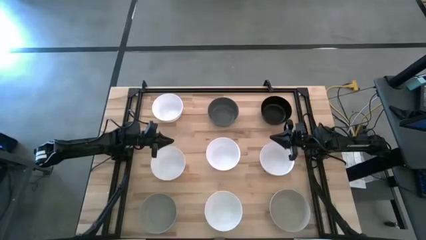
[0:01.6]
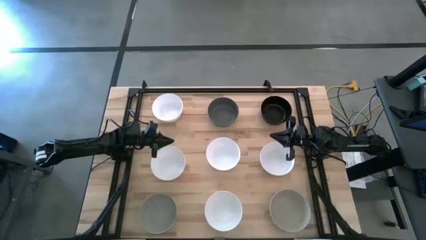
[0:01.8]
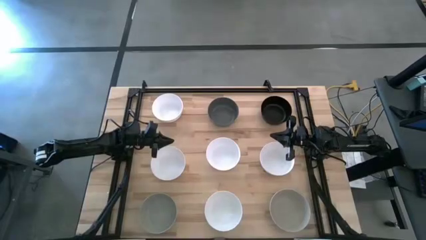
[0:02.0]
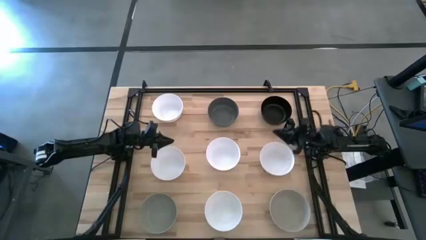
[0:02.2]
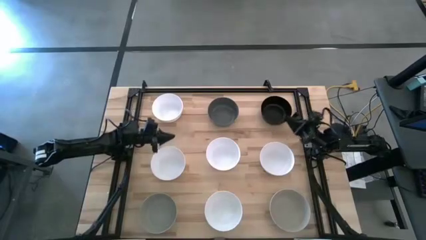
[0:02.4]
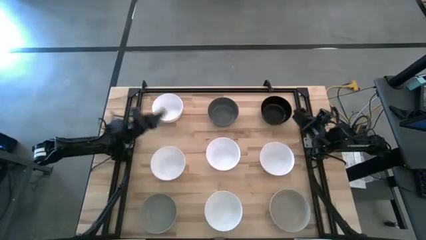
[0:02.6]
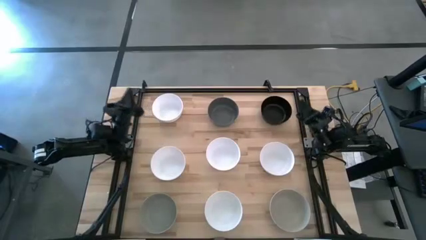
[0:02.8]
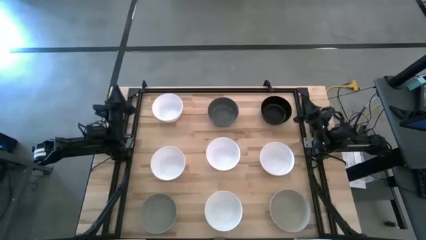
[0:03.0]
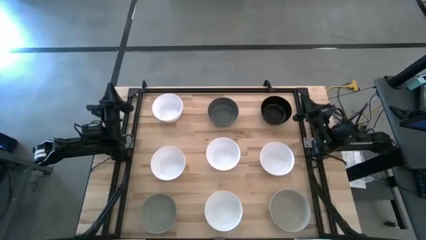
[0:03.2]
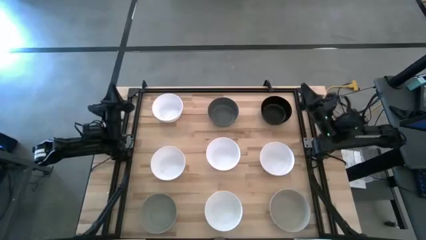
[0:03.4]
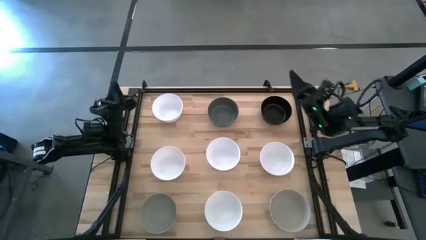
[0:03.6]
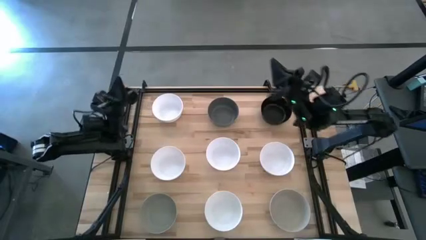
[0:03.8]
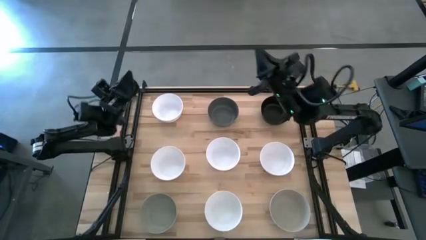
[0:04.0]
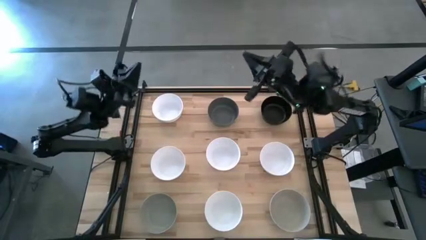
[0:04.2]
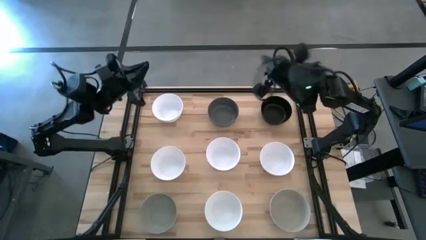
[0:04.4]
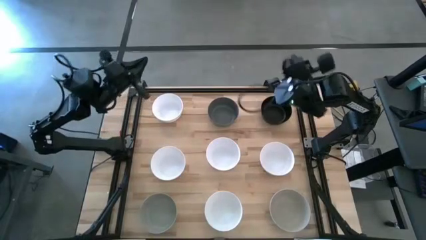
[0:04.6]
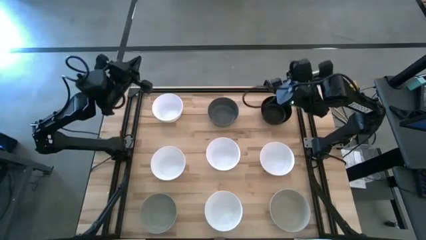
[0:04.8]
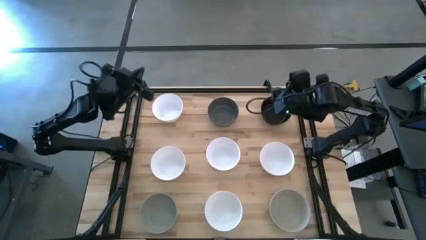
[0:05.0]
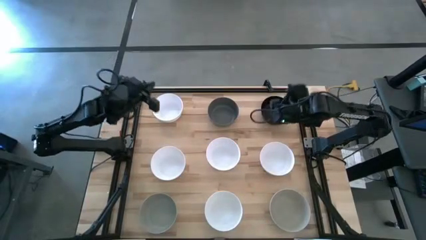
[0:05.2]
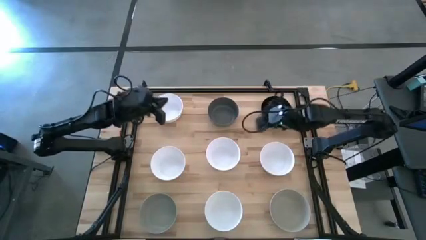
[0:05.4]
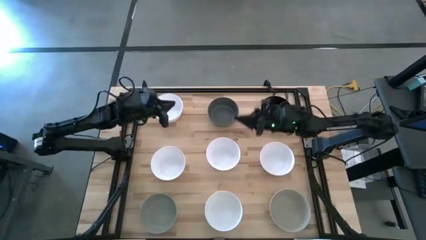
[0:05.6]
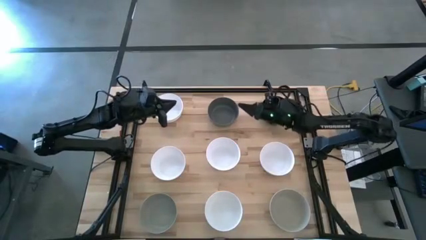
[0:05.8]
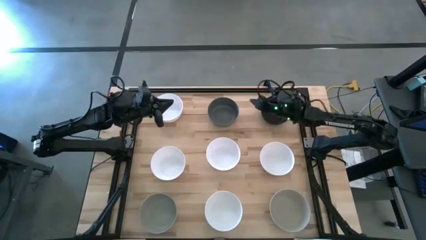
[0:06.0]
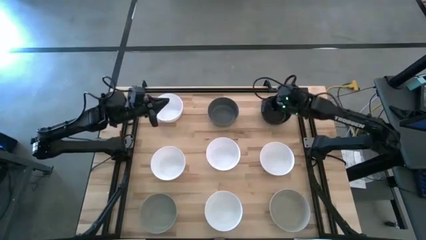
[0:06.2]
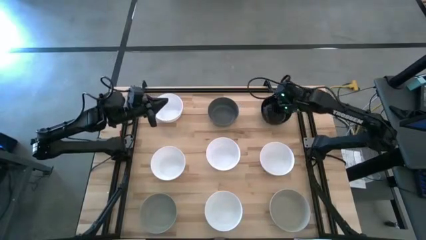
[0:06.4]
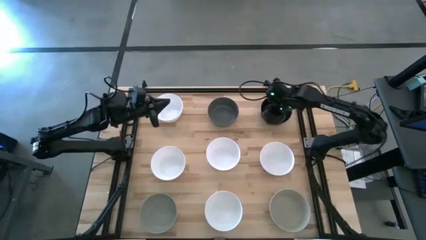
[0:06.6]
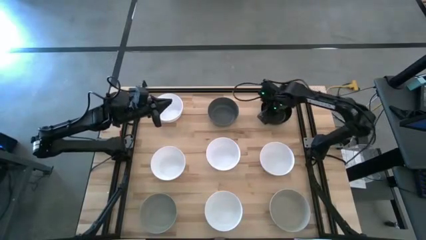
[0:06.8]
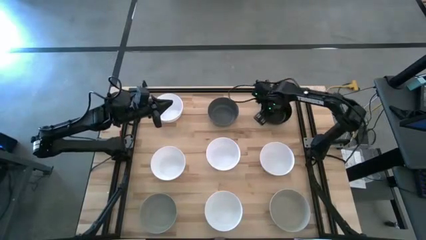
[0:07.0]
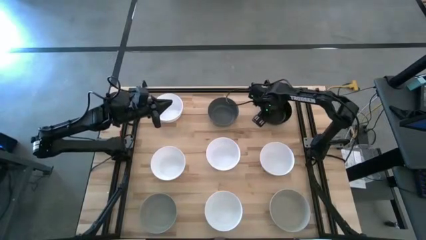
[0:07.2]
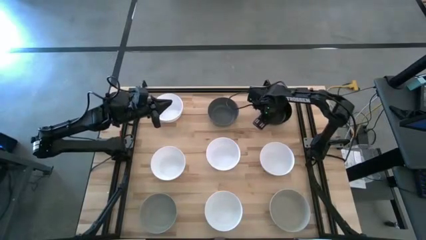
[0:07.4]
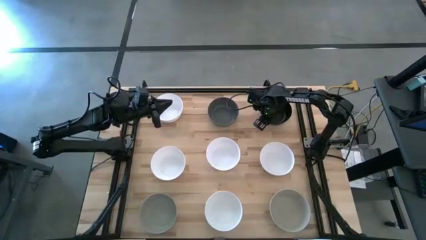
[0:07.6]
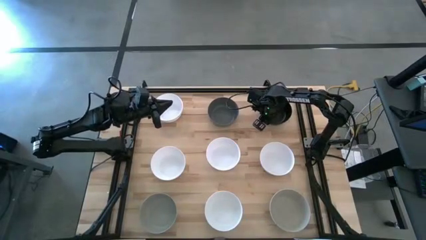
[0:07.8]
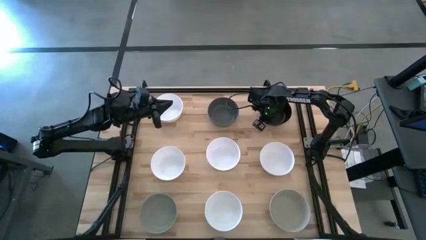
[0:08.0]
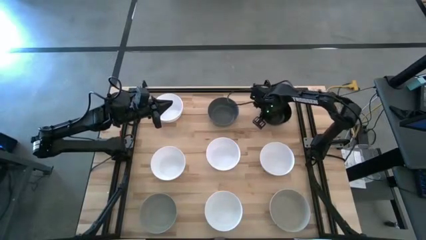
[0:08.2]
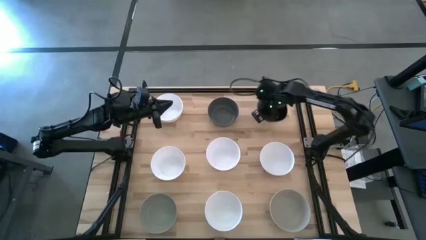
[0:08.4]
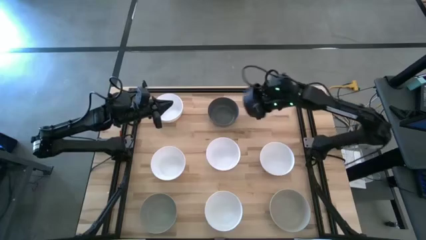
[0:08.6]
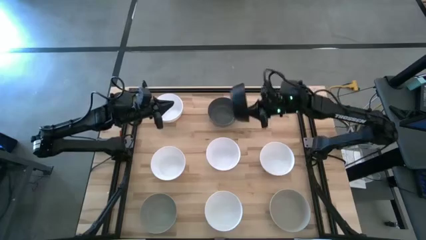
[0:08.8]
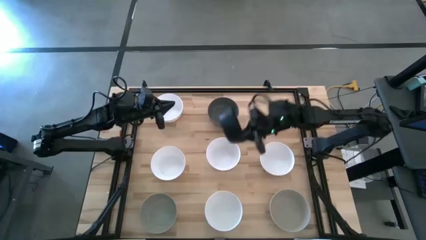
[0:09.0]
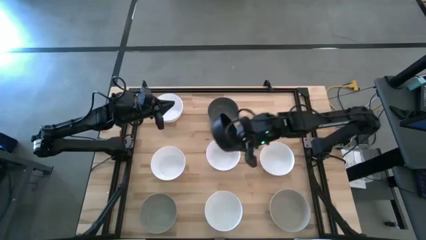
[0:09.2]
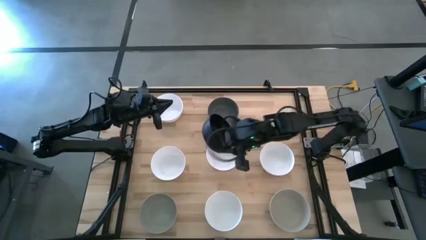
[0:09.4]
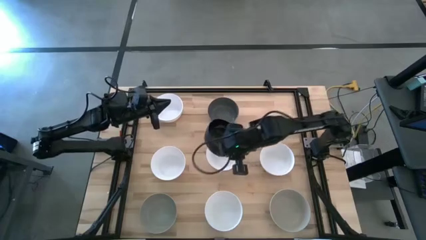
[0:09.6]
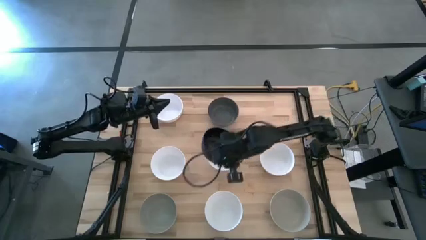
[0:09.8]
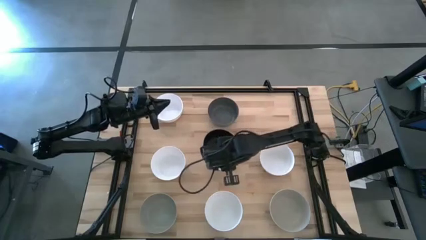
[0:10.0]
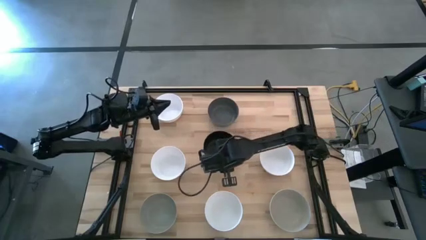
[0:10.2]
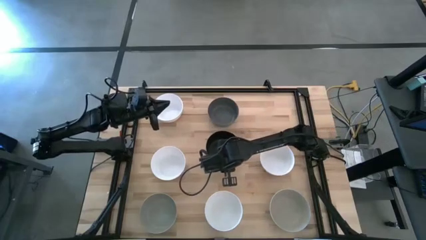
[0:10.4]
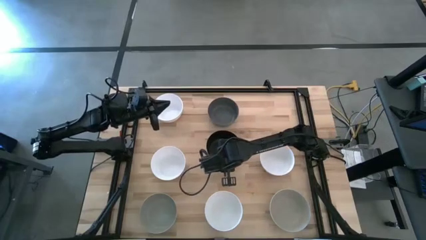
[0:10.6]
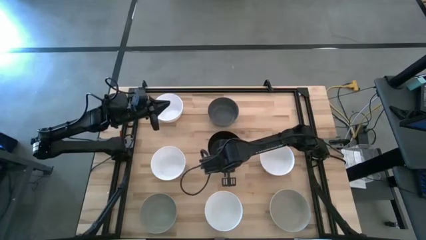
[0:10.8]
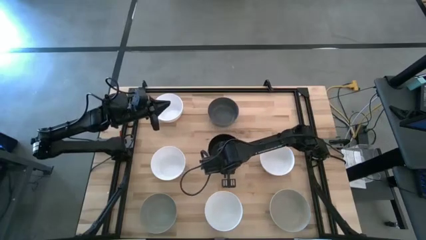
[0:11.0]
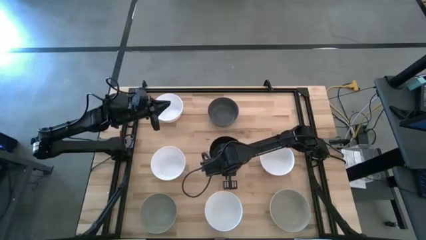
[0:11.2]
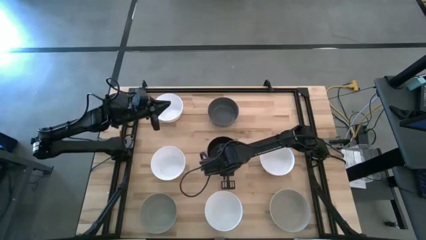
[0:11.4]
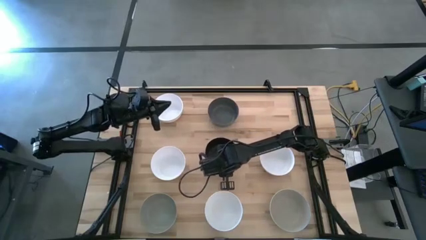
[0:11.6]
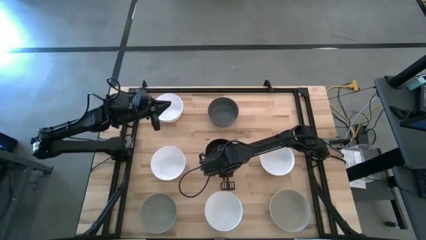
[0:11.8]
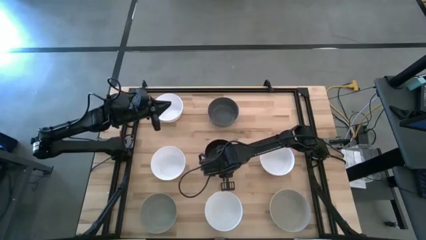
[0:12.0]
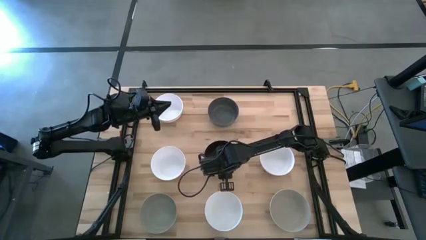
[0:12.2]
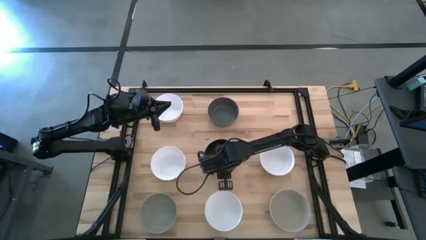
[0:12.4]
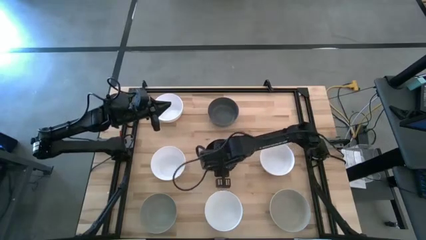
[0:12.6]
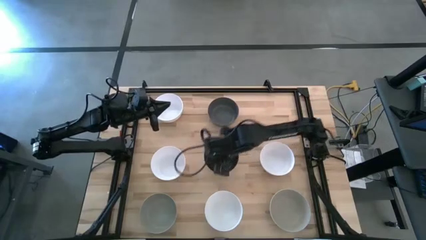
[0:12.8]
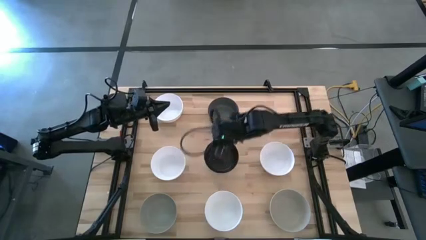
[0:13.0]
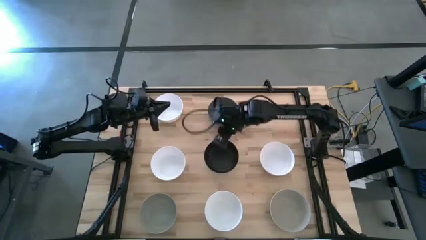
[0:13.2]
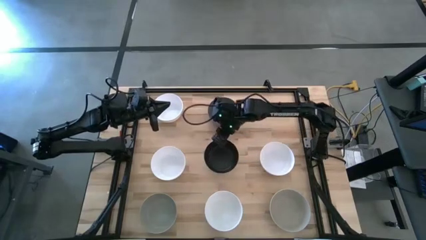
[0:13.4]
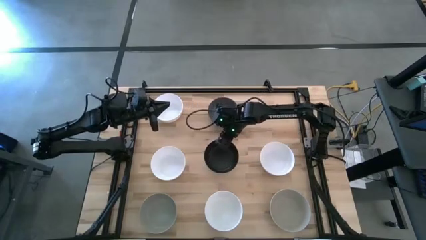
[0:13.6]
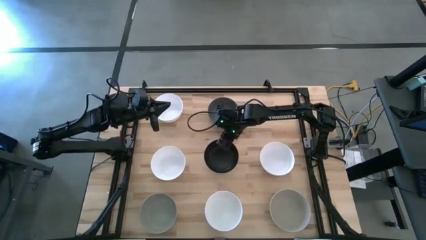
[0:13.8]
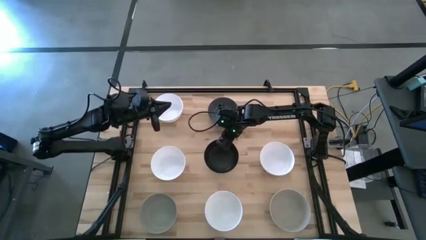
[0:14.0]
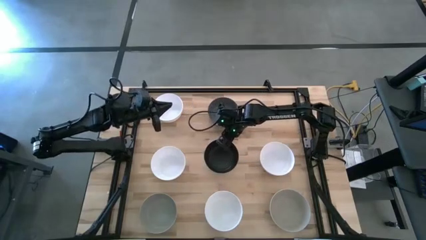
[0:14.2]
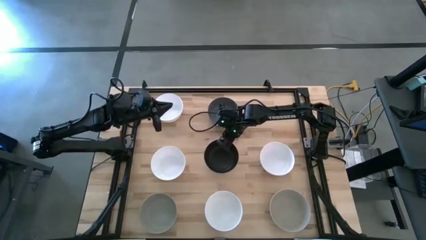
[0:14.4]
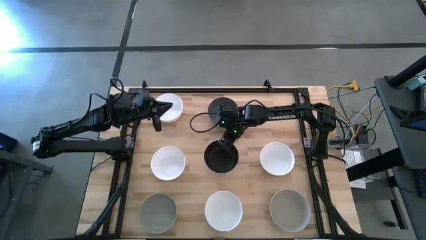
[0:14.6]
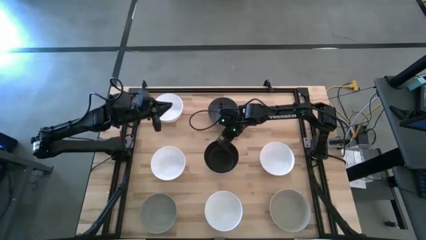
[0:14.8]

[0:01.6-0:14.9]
Task: Nest bowls inside each other
Stack the black bowl on the white bowl
